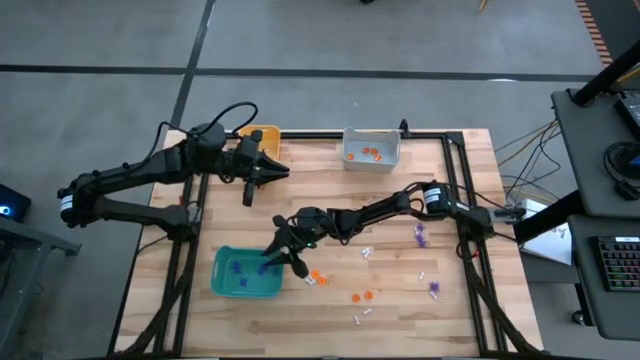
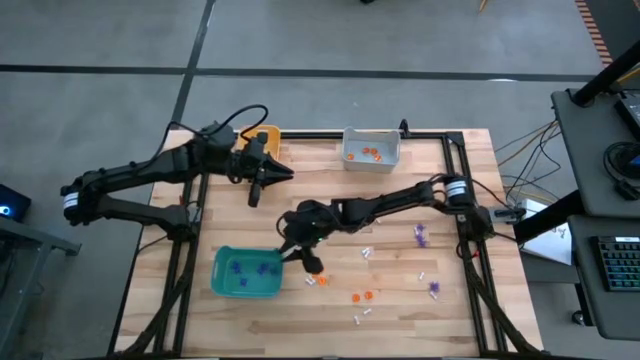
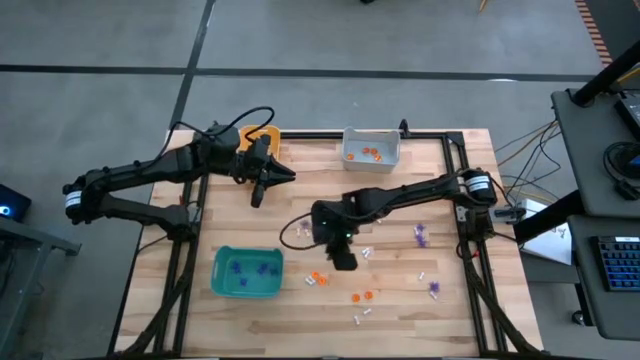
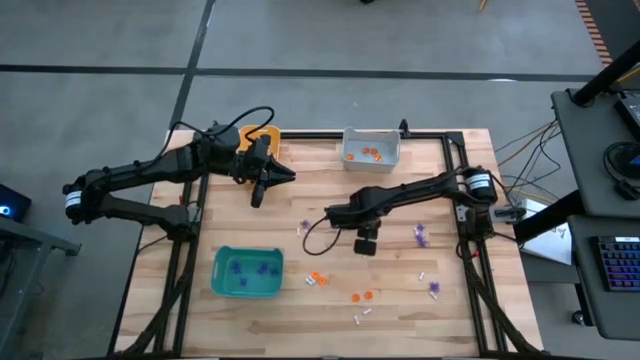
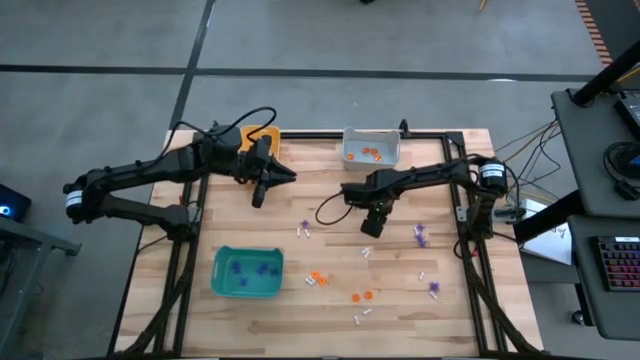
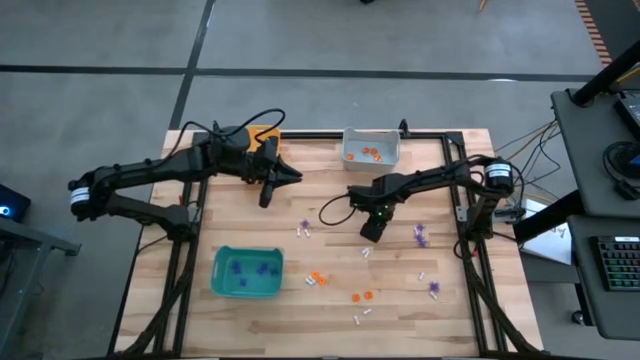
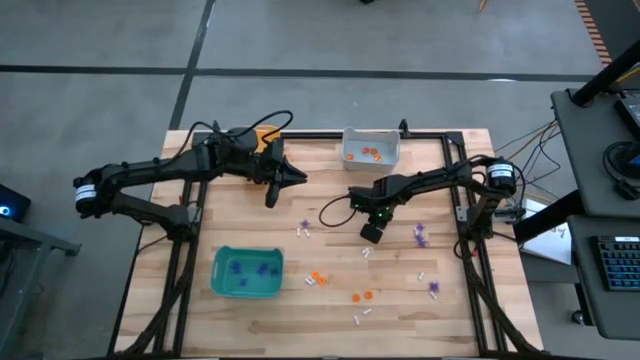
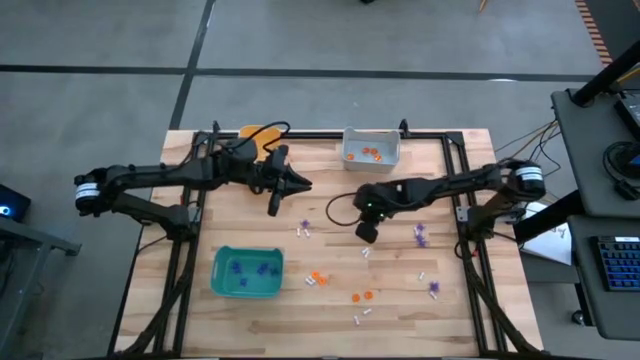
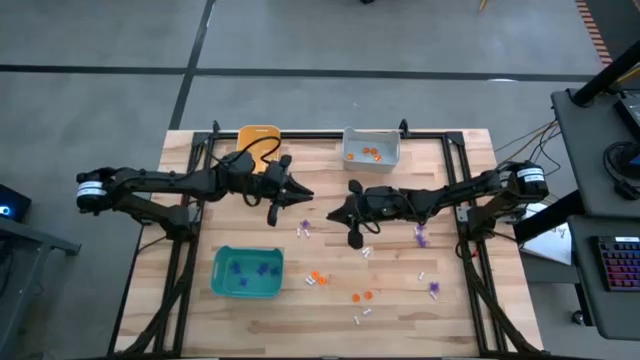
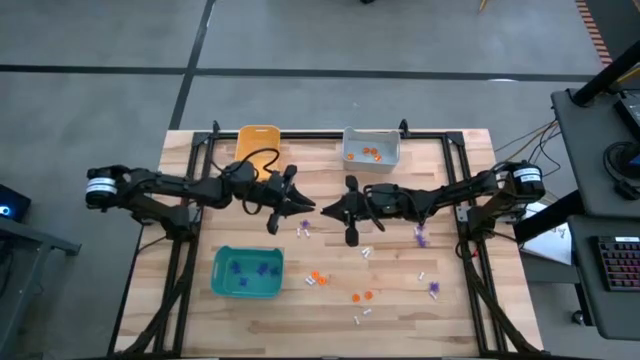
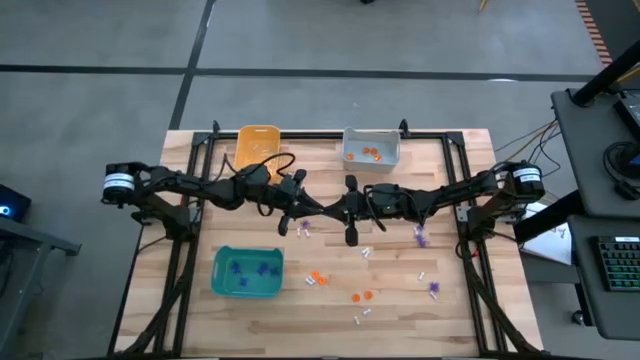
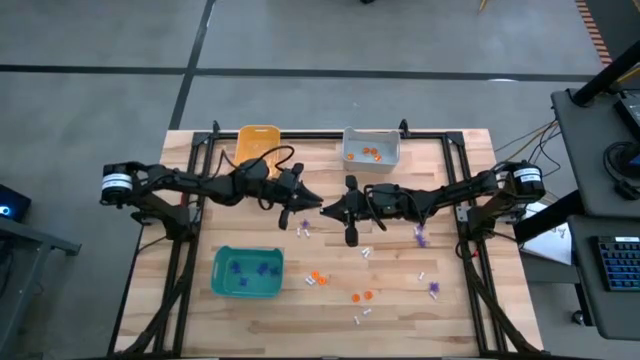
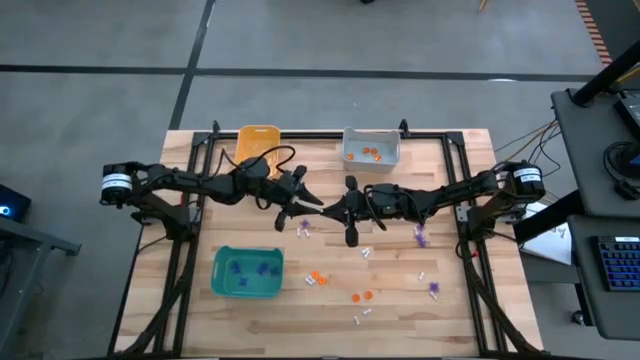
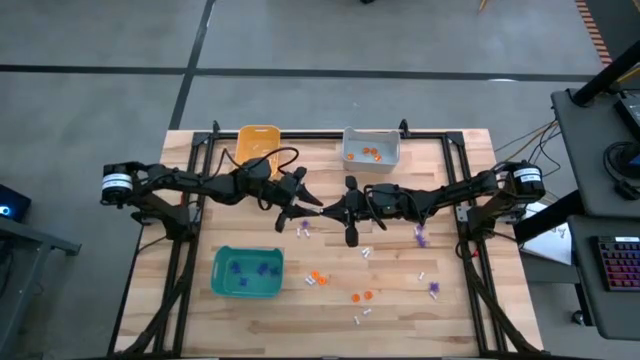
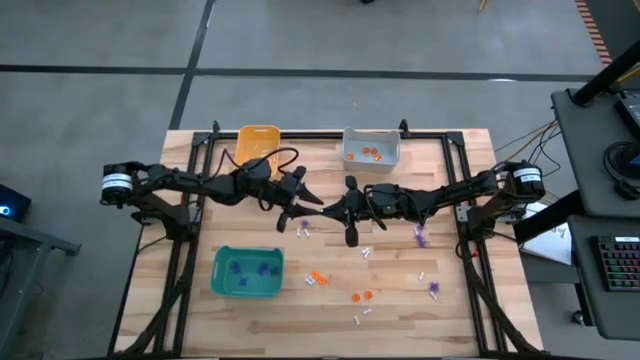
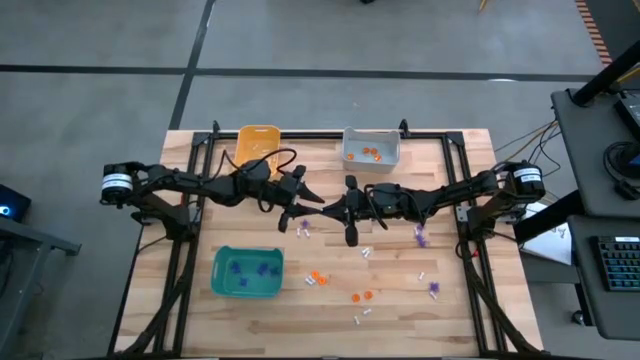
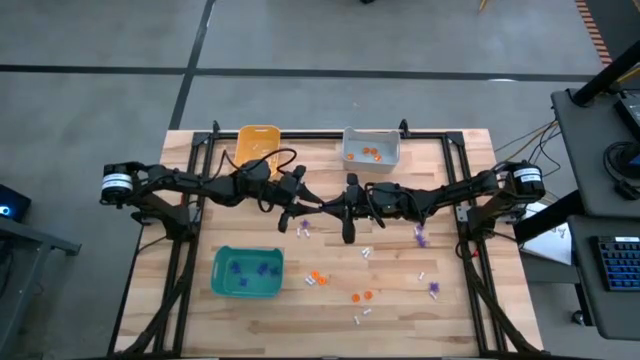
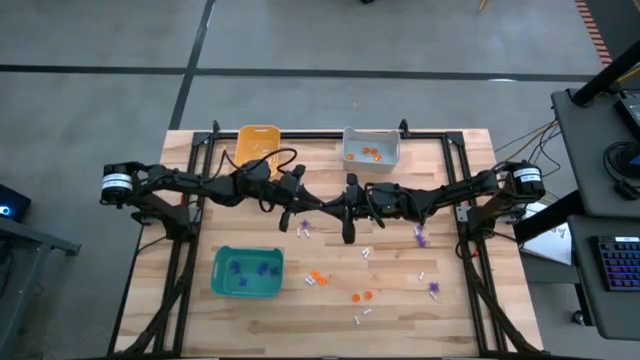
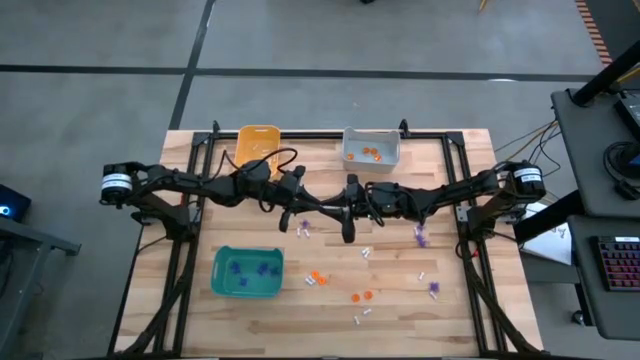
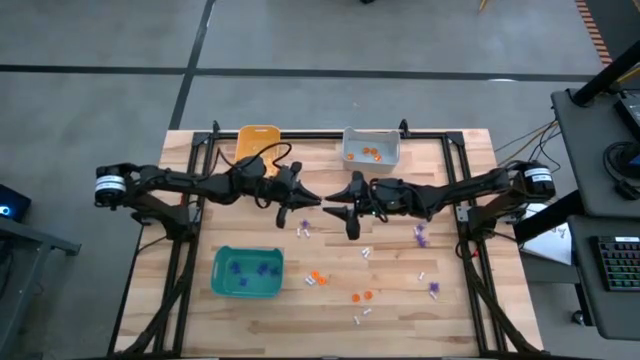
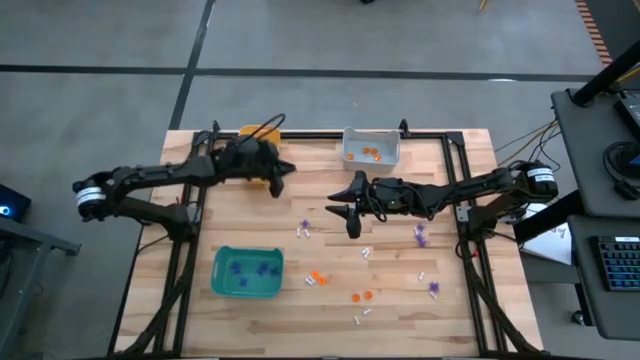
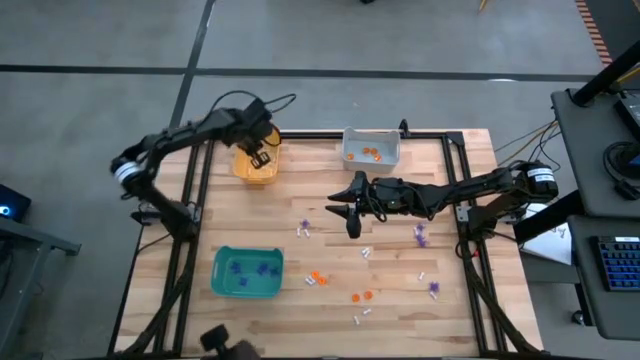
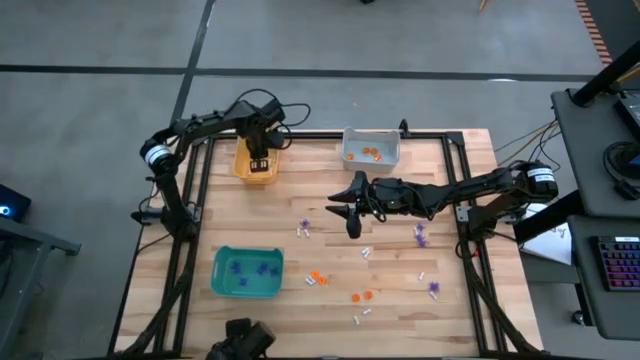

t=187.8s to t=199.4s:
Task: Sort Halloween decoration
Put the white bone toy into the orange bin

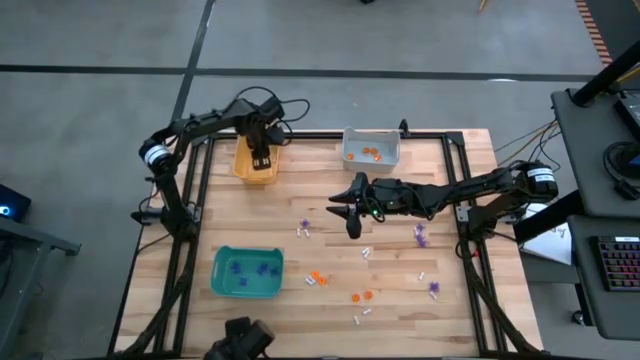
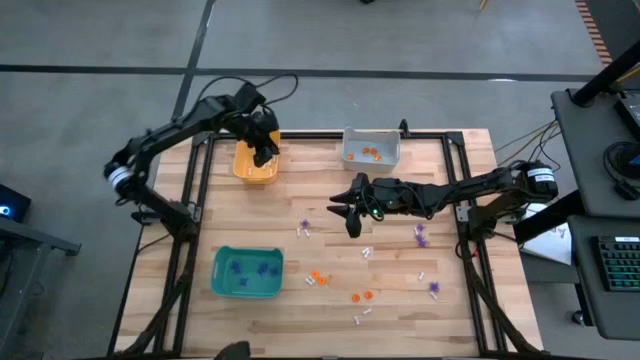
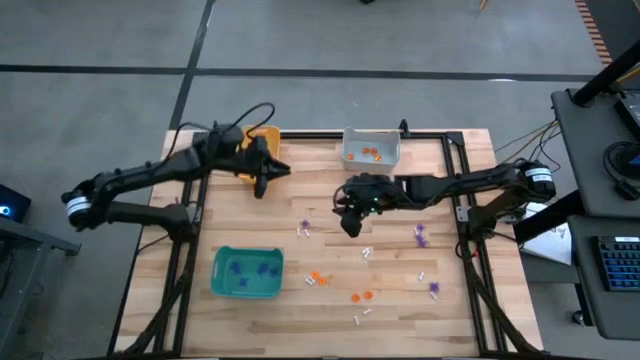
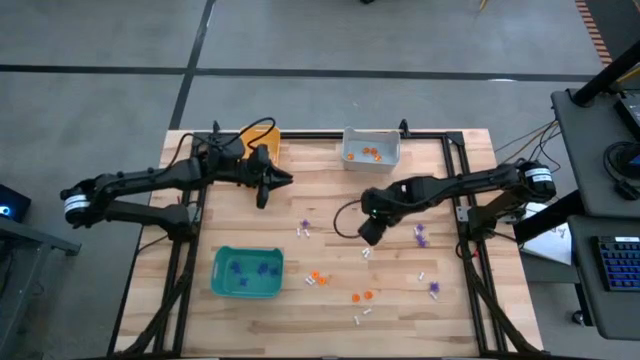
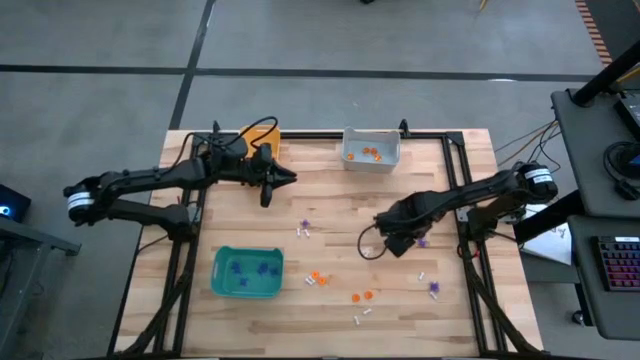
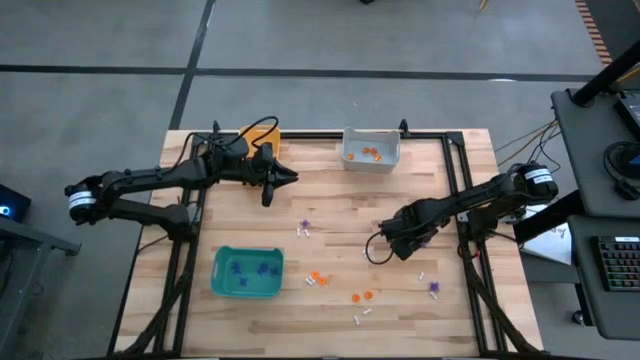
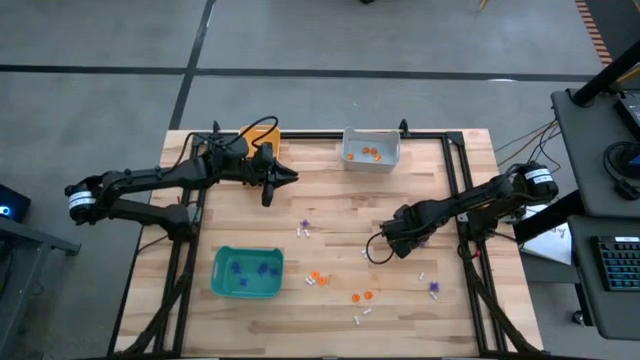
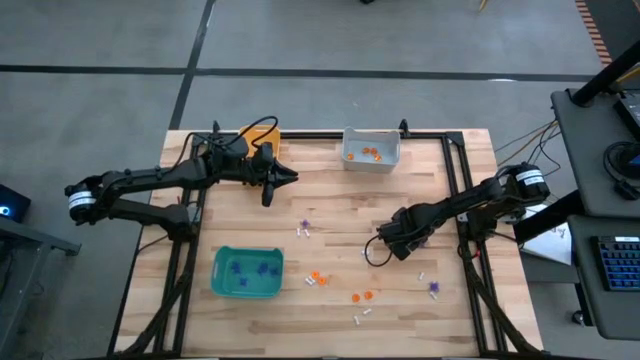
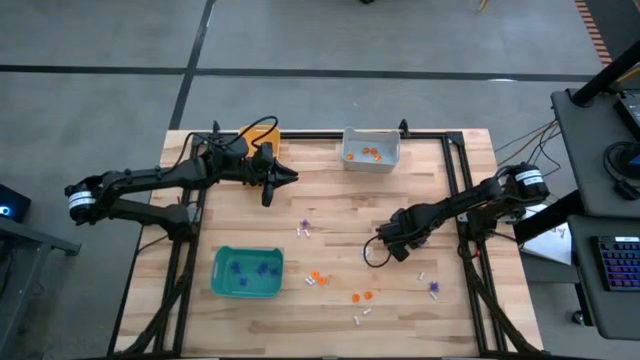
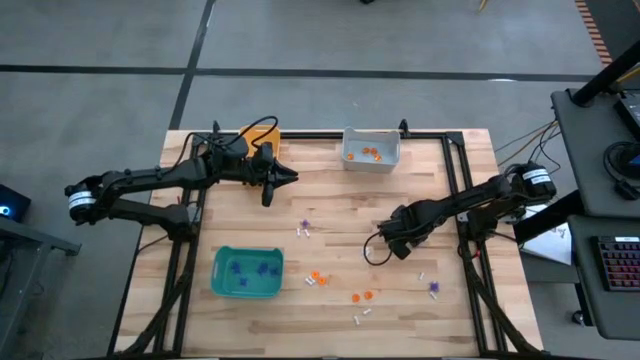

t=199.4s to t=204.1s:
Put the blue spider toy into the green bin

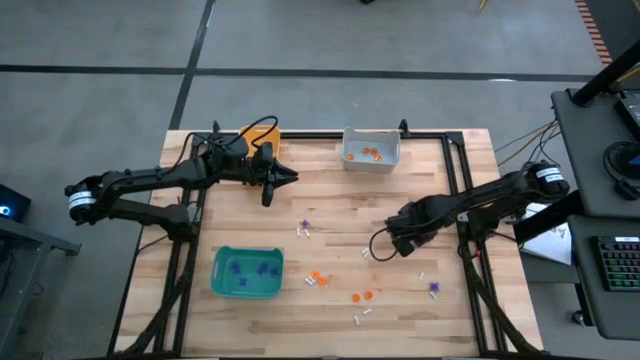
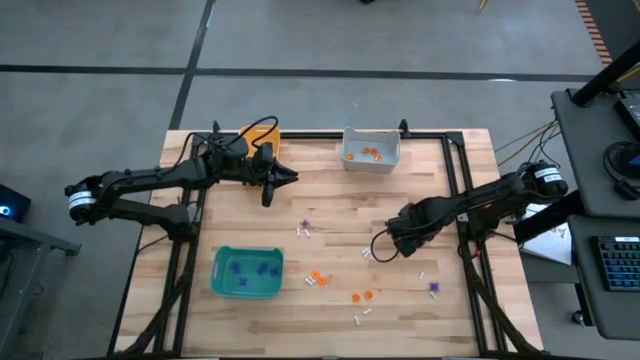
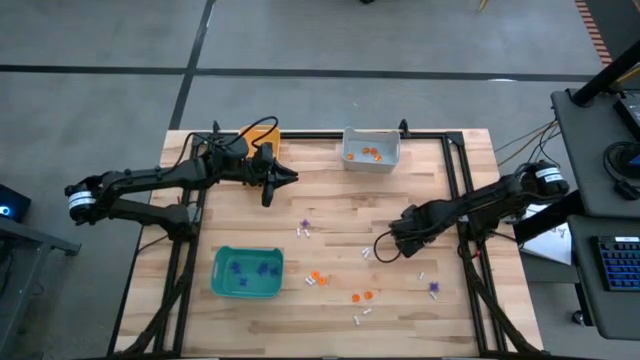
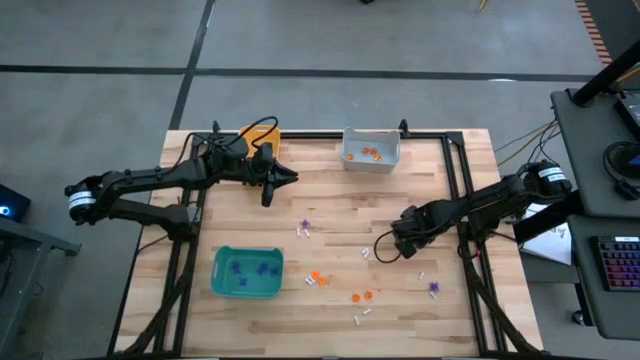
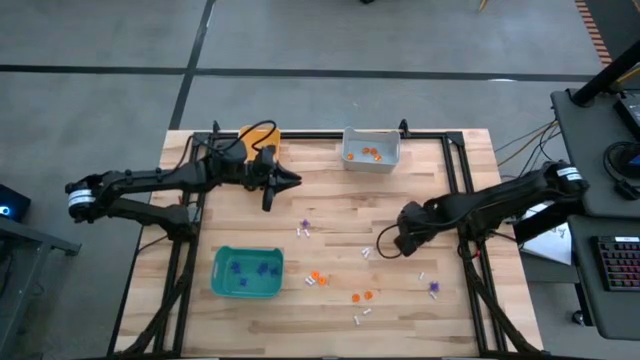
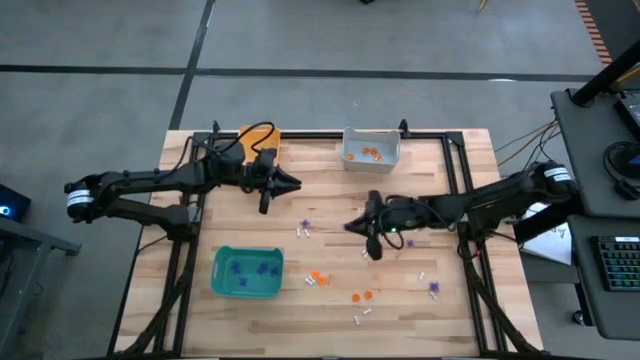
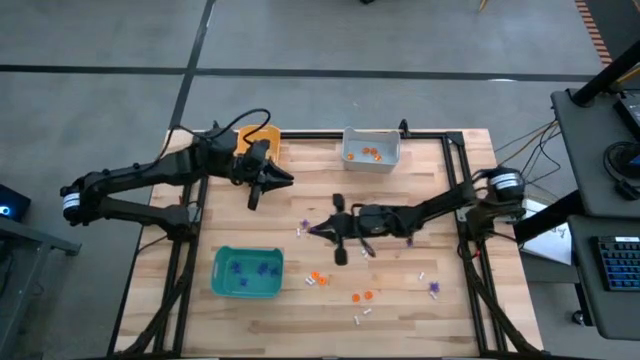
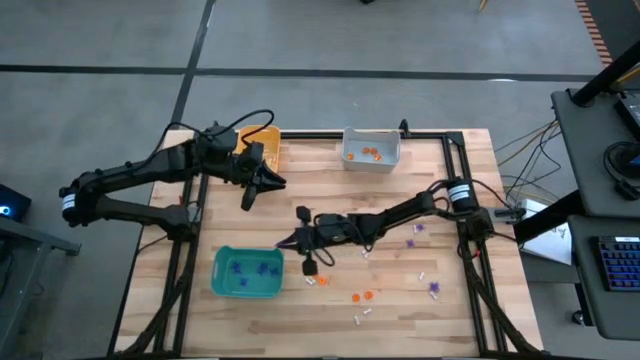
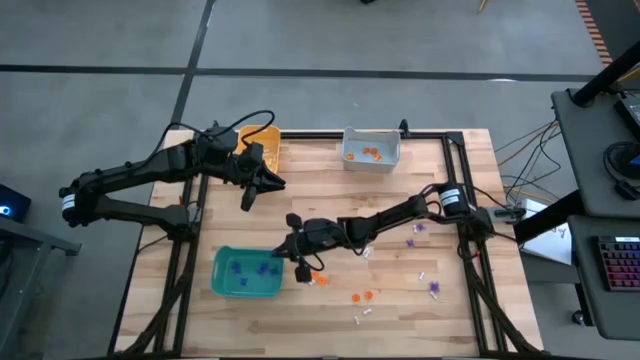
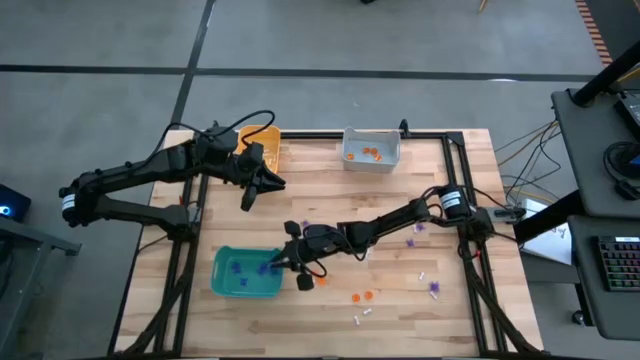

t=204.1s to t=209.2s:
Put the blue spider toy into the green bin
